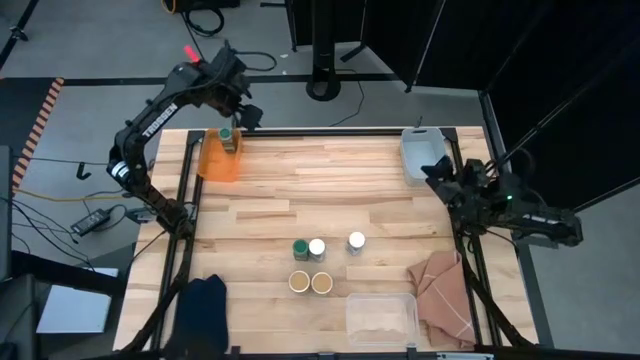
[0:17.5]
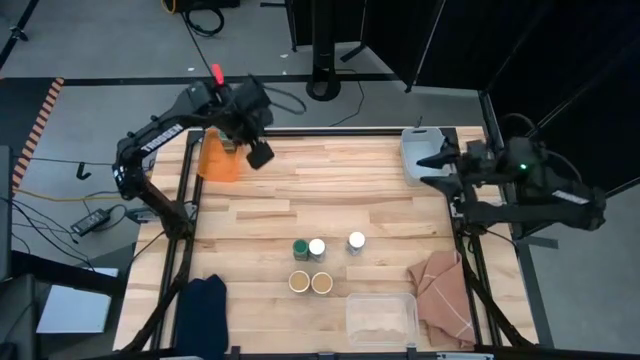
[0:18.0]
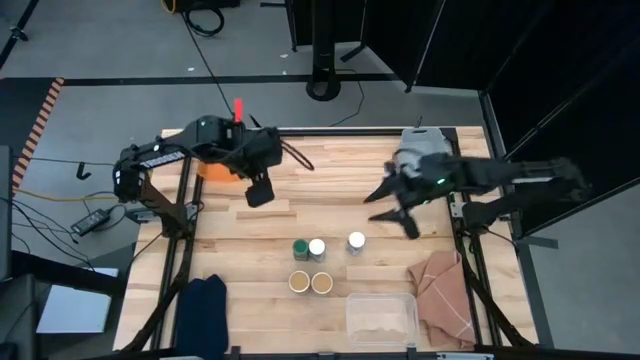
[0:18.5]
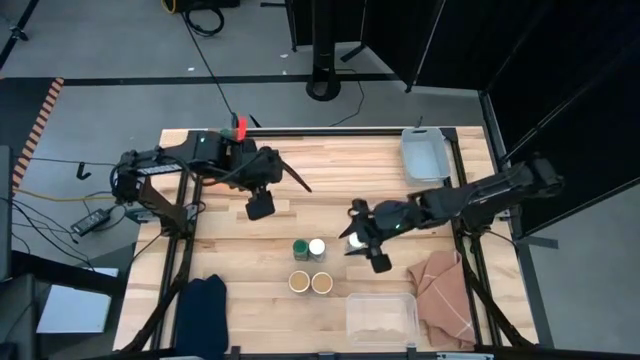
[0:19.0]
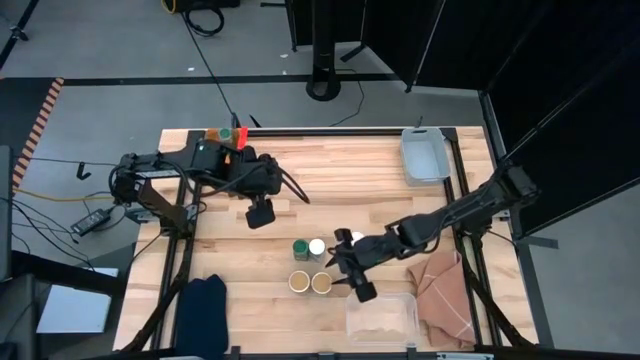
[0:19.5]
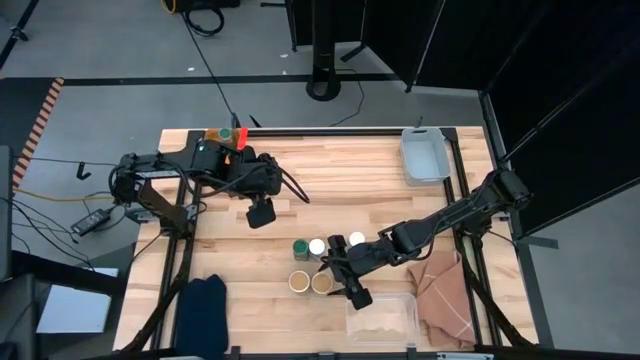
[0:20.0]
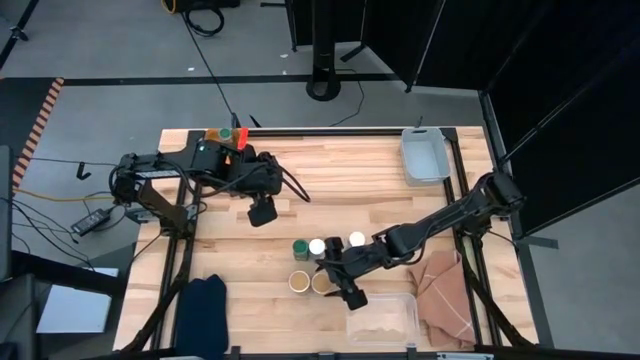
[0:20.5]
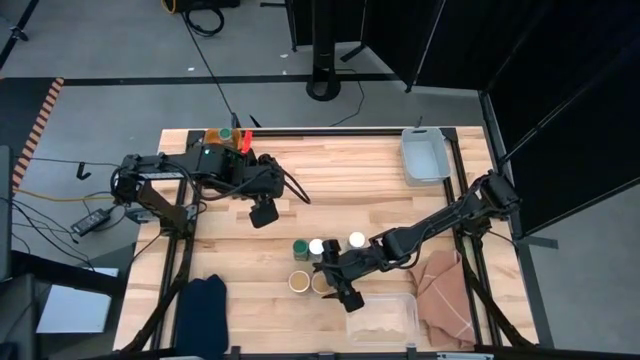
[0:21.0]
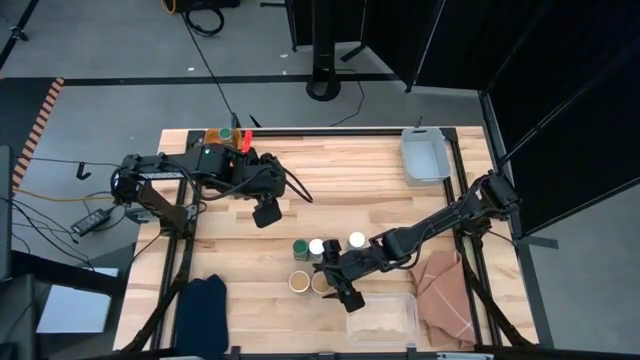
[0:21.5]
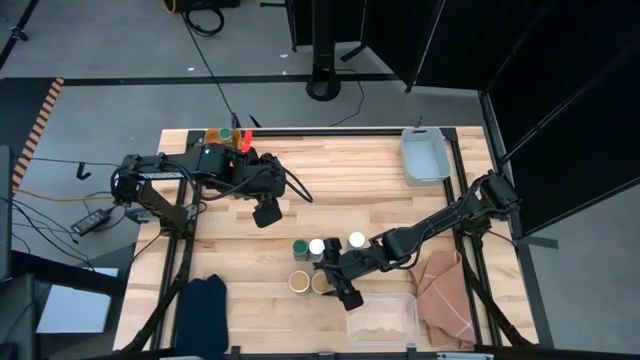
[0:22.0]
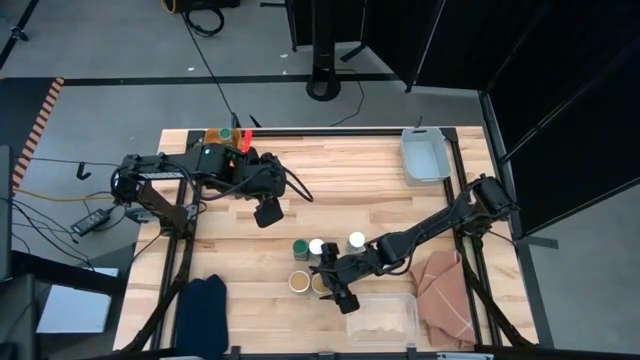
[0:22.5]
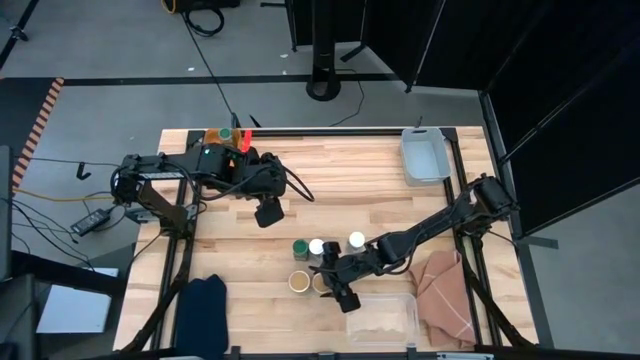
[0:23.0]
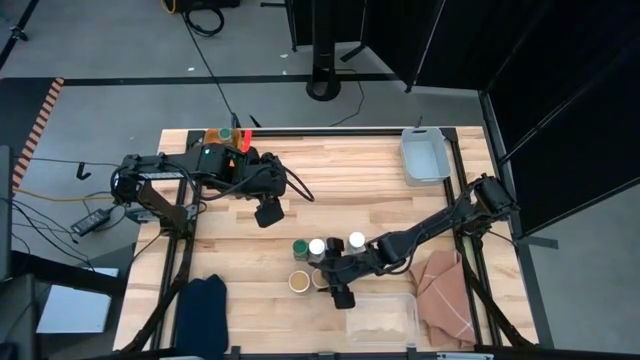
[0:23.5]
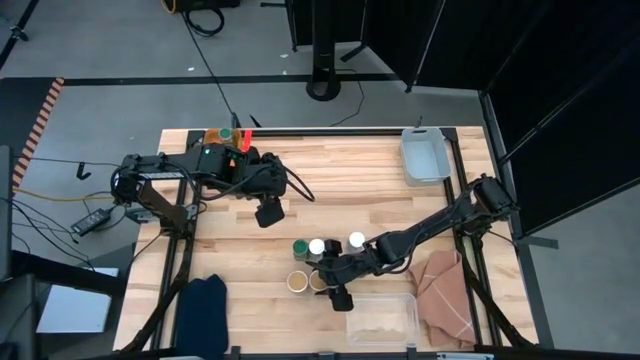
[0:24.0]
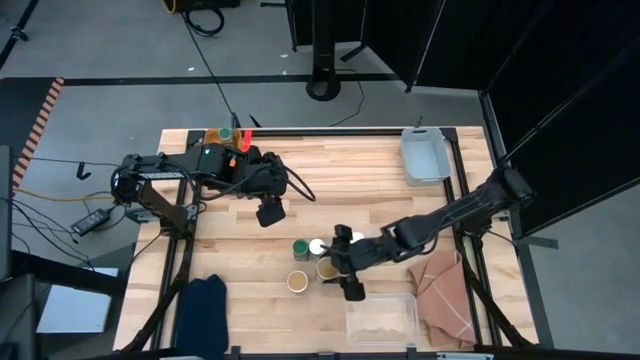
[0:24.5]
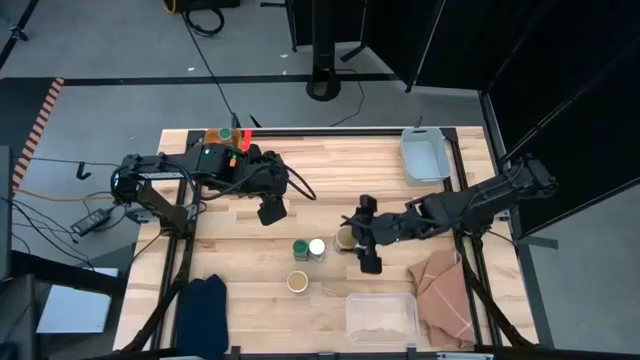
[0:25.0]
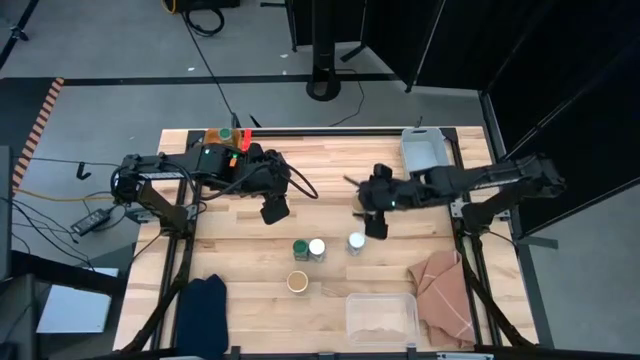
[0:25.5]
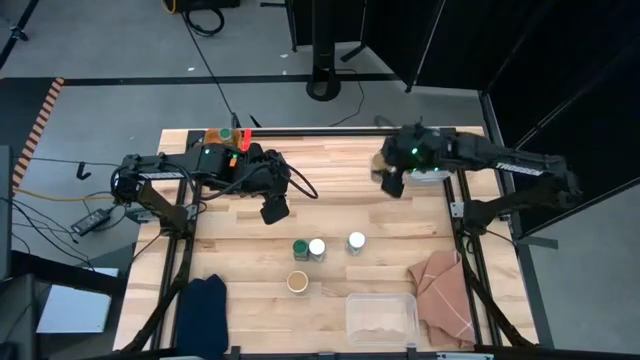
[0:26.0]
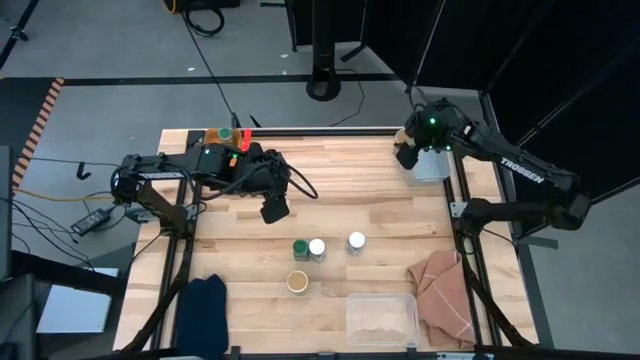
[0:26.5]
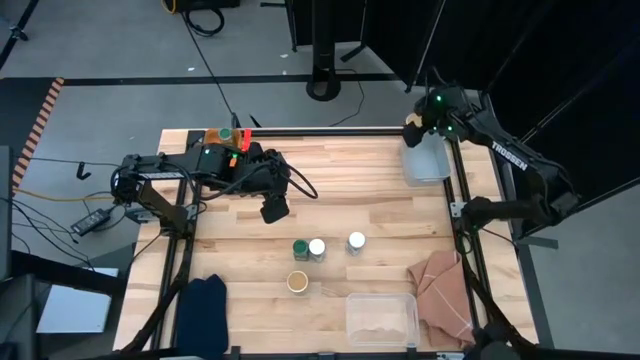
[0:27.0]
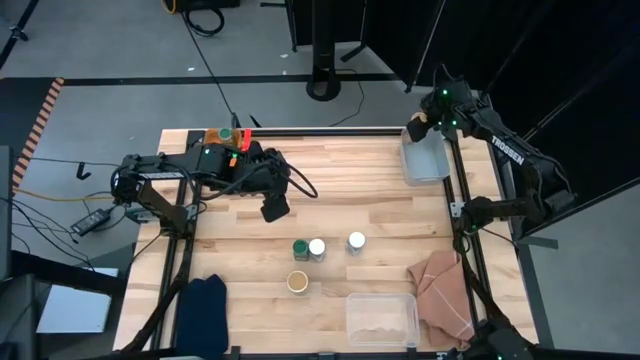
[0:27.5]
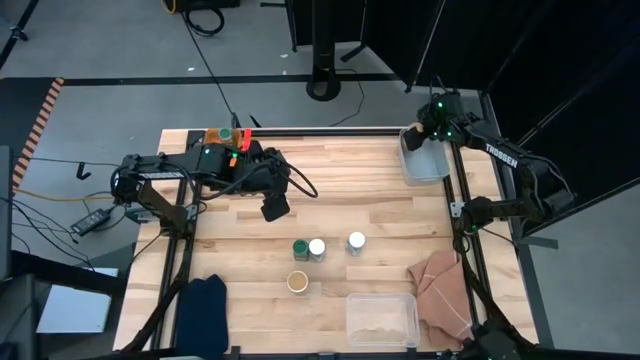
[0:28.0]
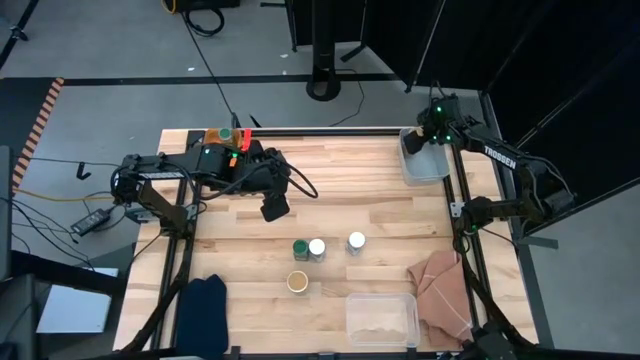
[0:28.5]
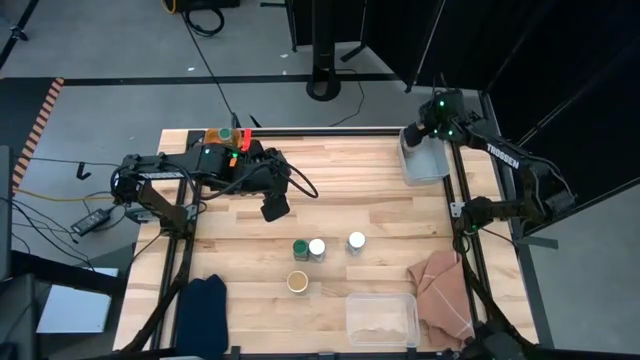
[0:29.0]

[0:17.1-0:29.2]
Task: Sort spices by type
Put the right gold seasoning bottle into the gray bin

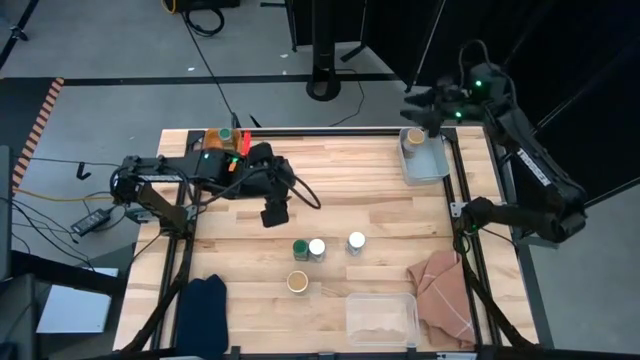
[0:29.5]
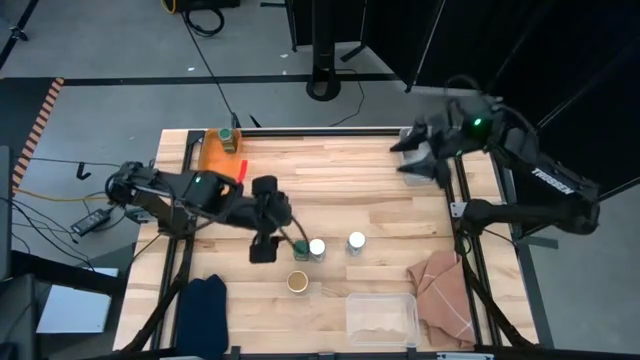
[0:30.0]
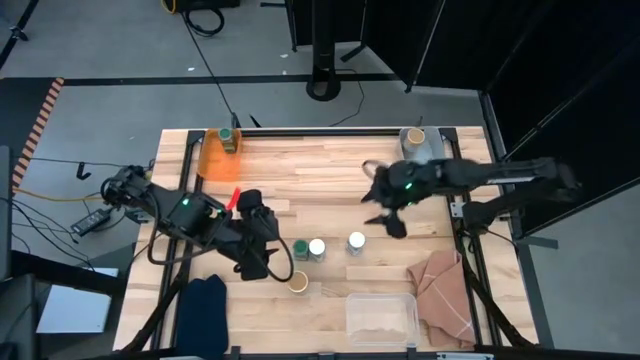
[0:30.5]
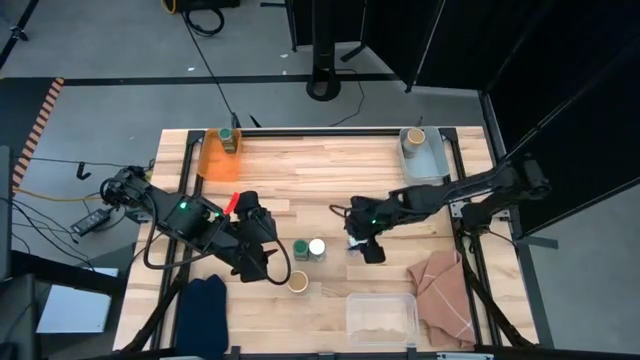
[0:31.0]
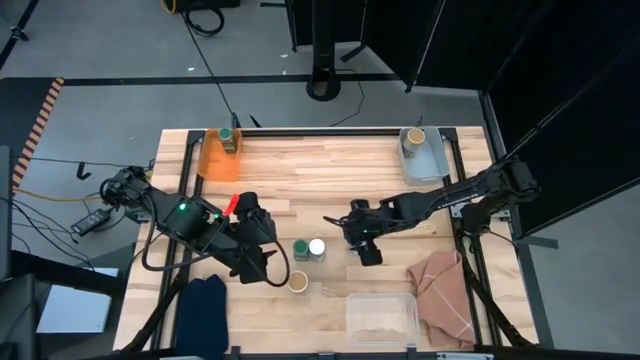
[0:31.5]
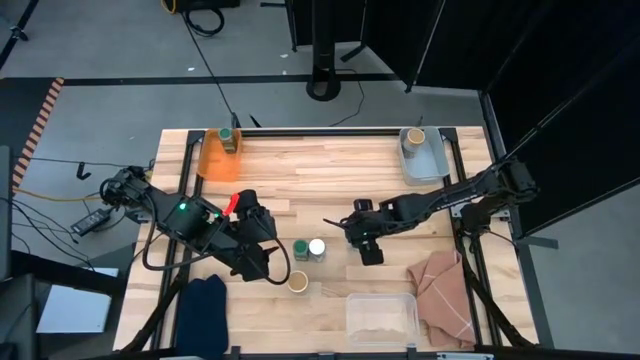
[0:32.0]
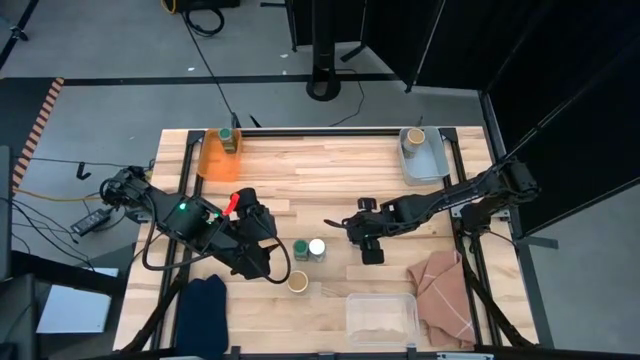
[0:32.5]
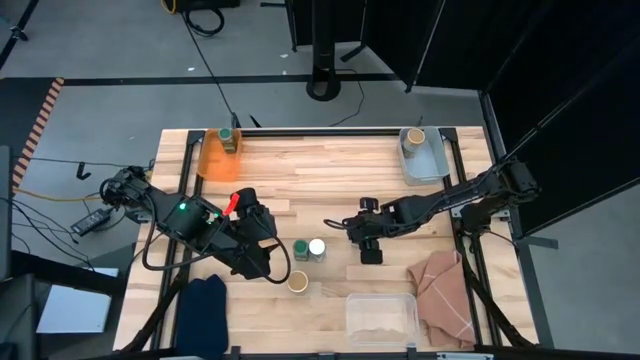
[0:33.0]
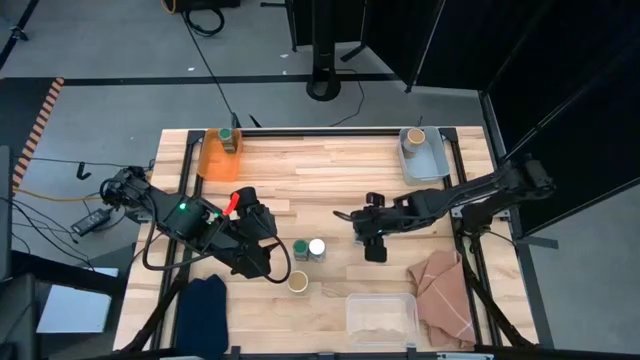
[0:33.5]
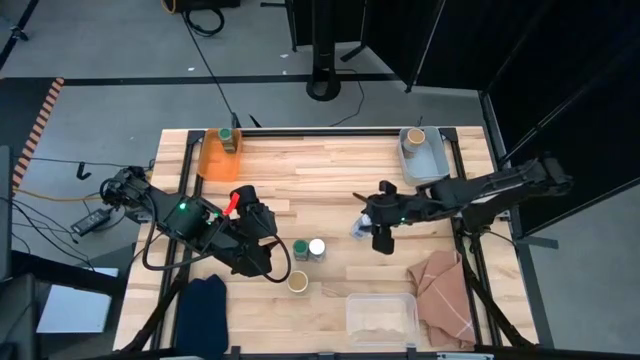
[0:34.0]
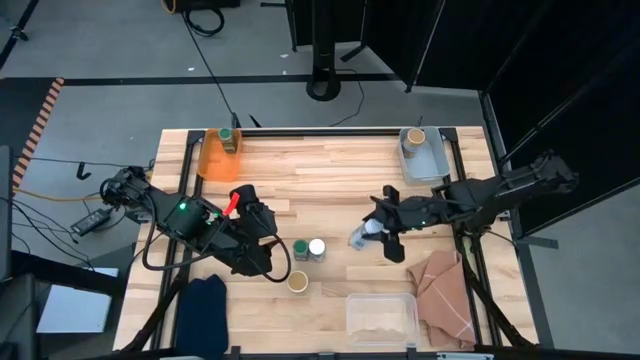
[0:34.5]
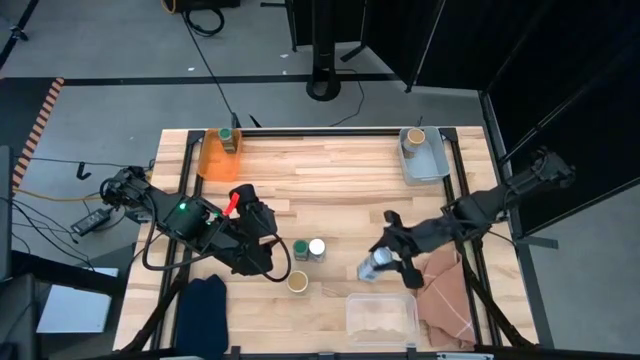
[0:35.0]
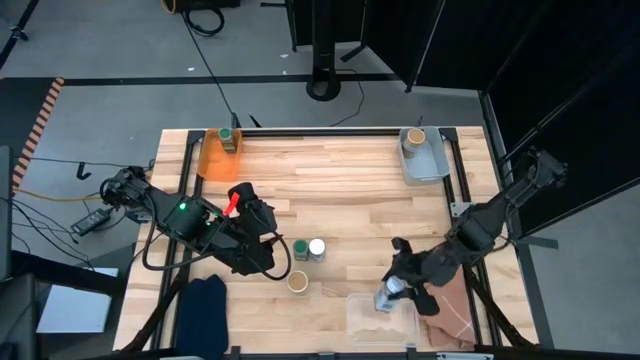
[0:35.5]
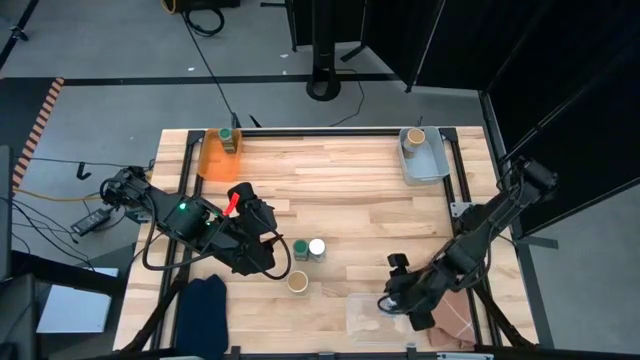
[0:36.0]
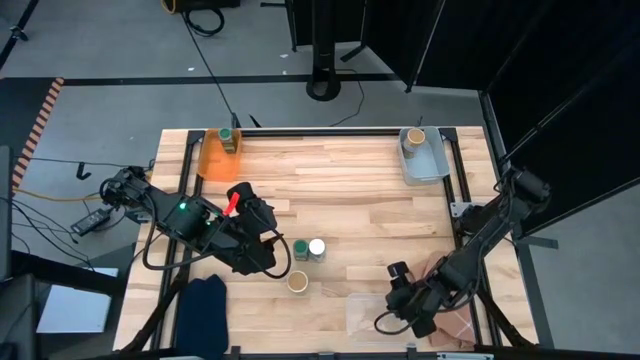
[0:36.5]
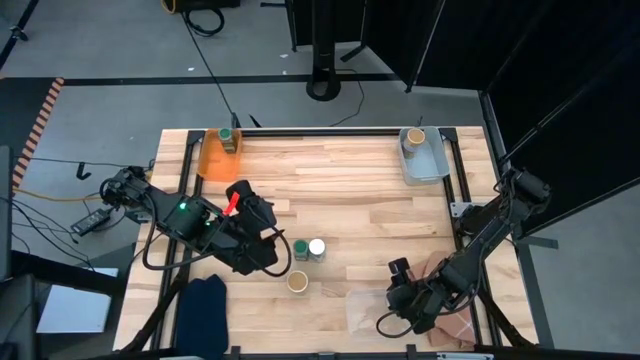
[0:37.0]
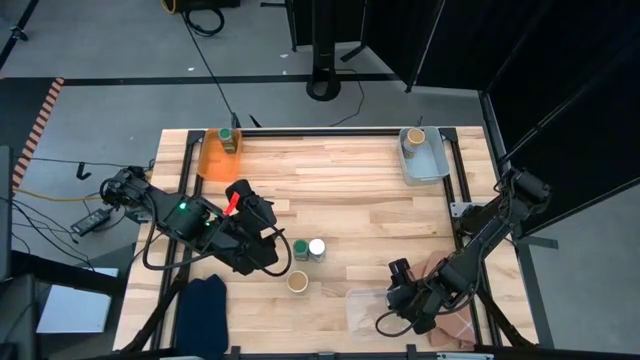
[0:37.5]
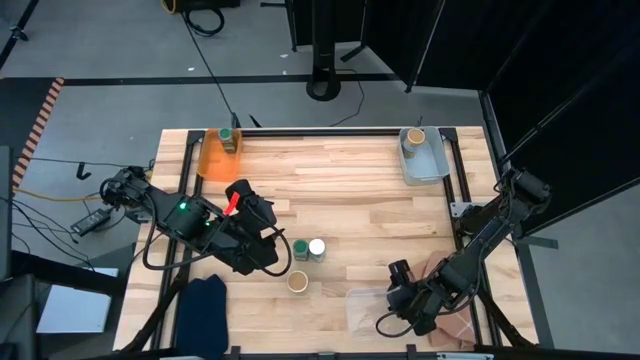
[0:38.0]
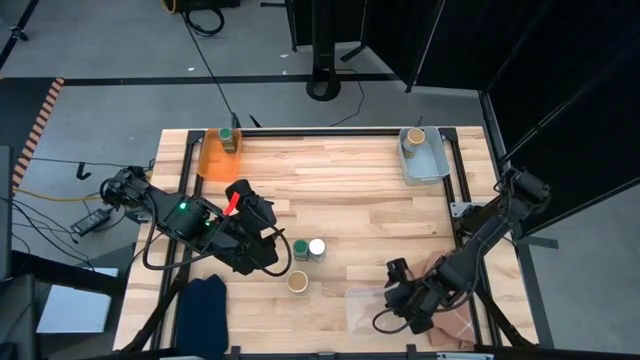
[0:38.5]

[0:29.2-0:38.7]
Put the right white seasoning bottle into the transparent bin
